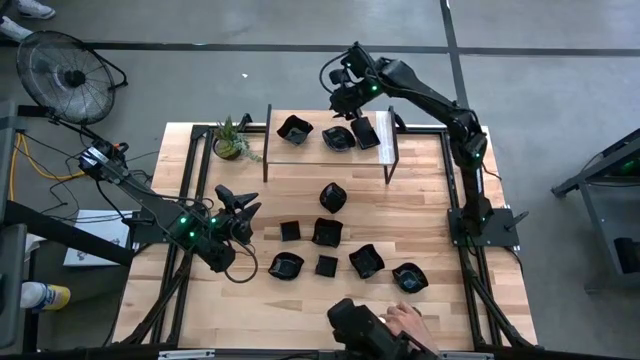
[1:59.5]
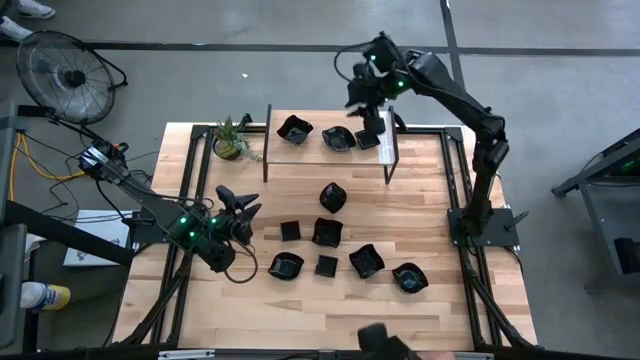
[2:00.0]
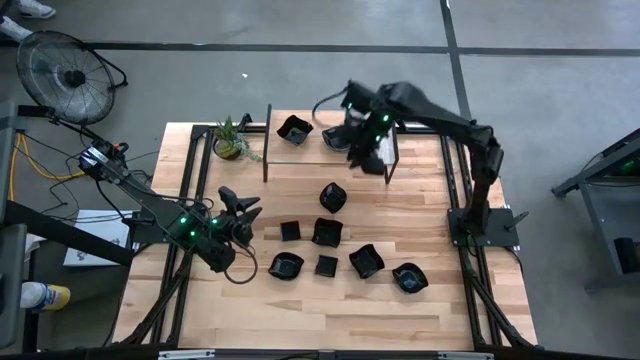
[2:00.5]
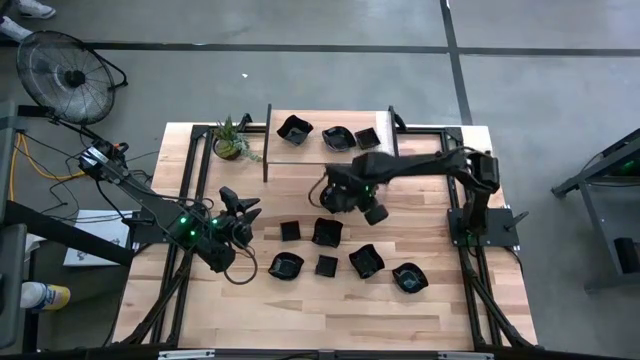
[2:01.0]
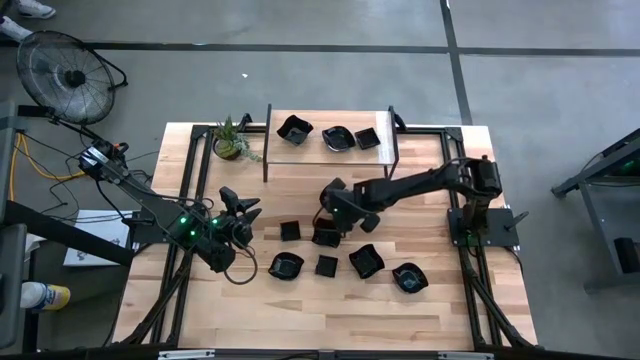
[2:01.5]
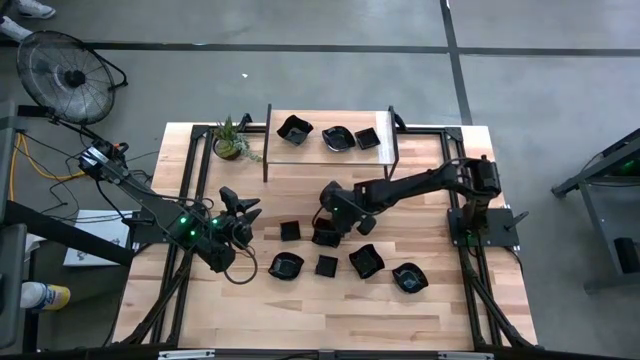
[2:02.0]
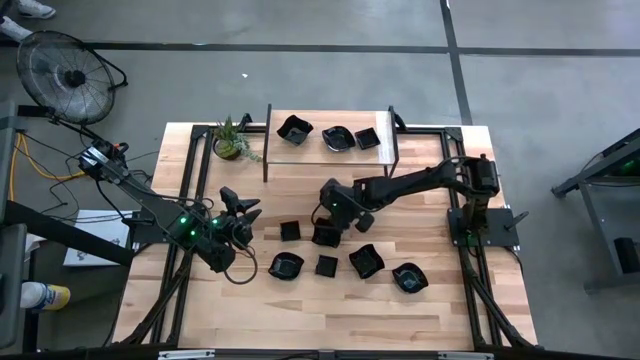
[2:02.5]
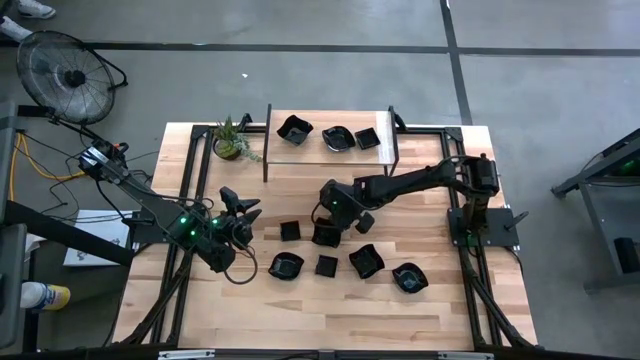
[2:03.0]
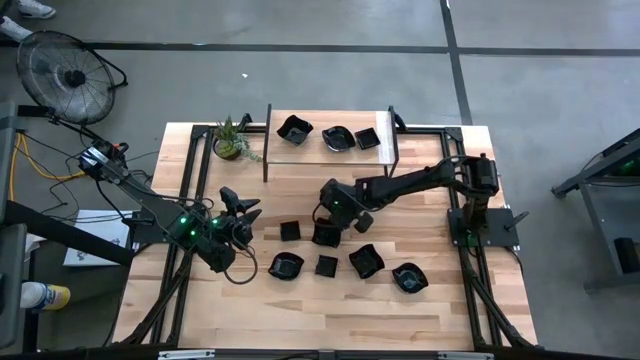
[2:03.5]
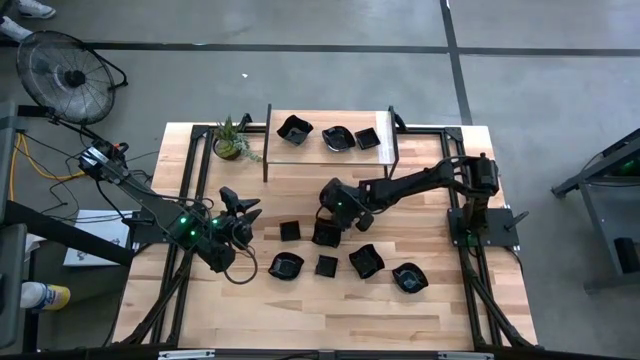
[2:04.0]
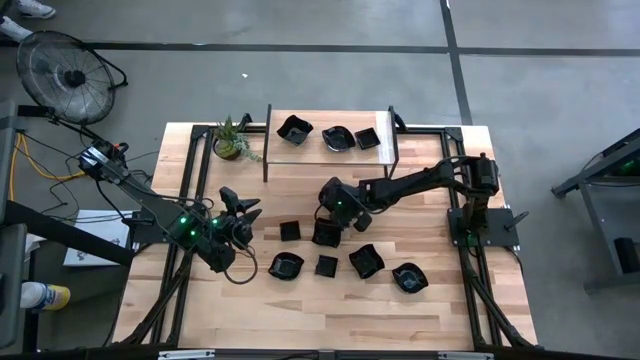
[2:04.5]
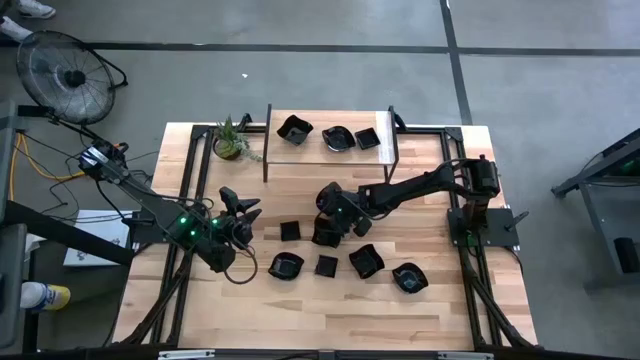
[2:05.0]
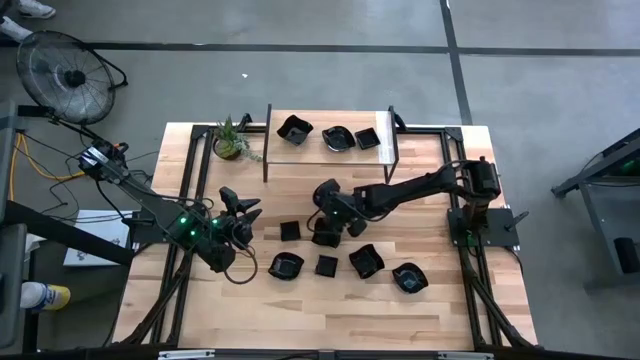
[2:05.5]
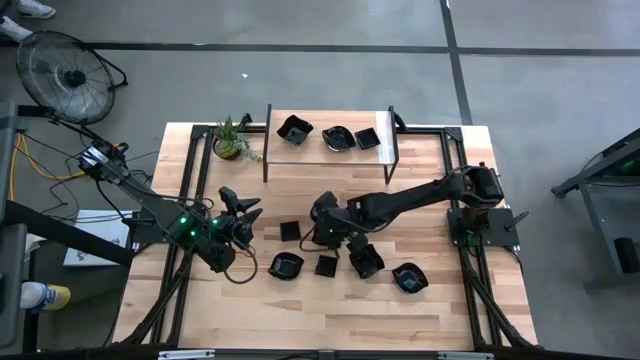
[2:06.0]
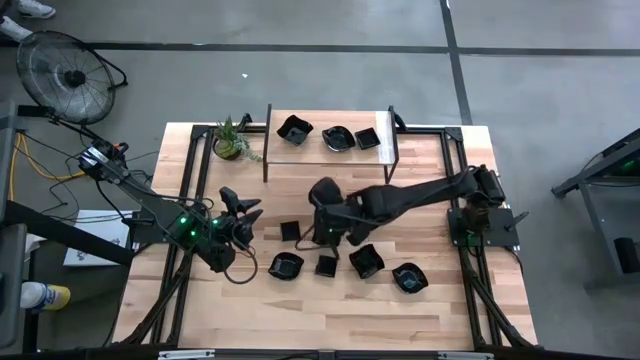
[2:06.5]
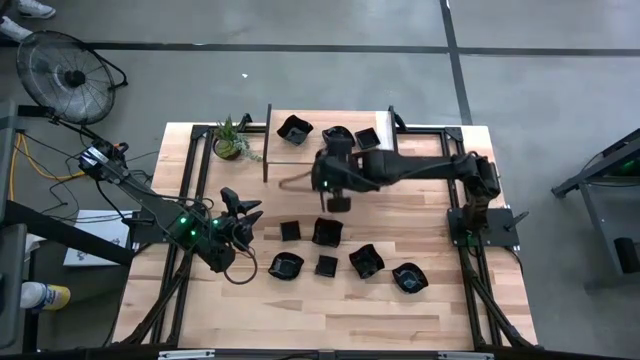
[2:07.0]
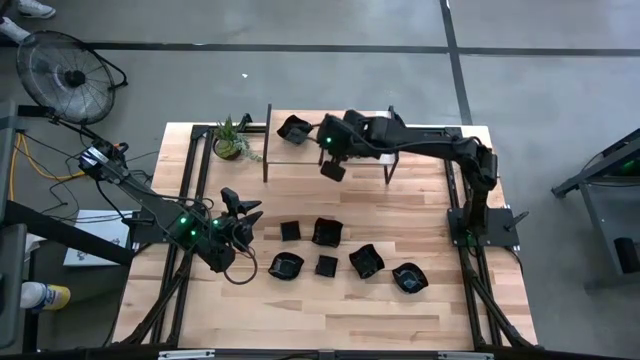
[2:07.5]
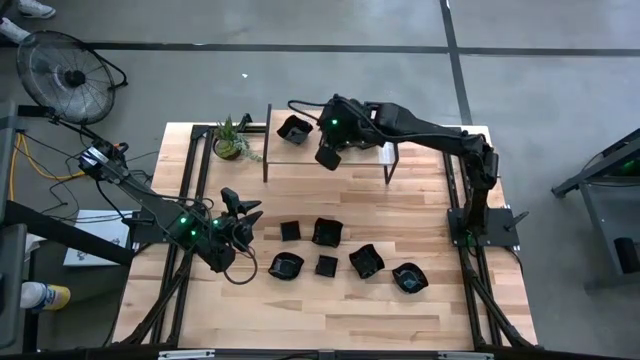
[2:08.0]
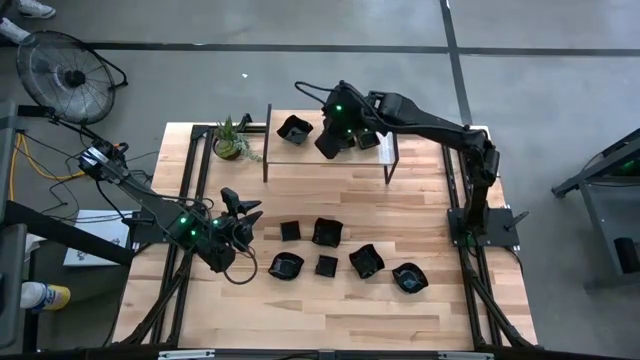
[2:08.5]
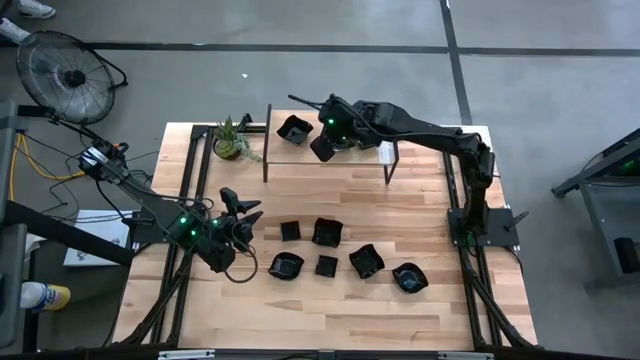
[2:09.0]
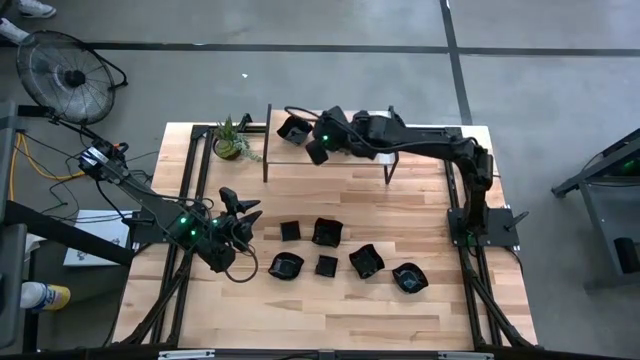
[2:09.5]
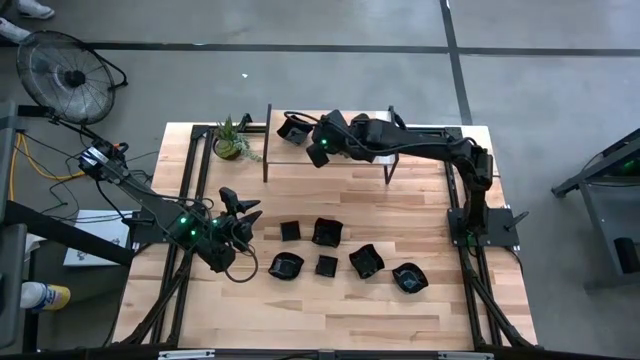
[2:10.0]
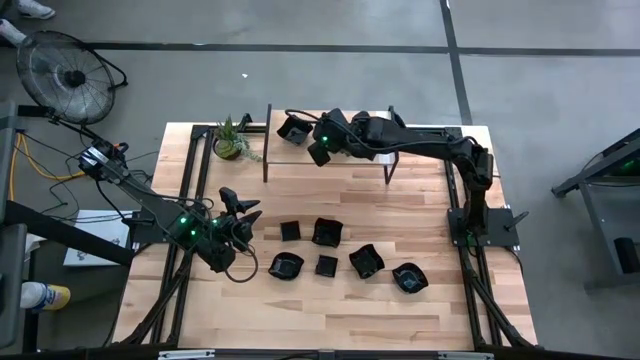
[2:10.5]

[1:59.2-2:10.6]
Task: Pick & Place Mini shaped plates
Stack the black leaf-shaped plate on top of the black leaf-shaped plate on the shelf

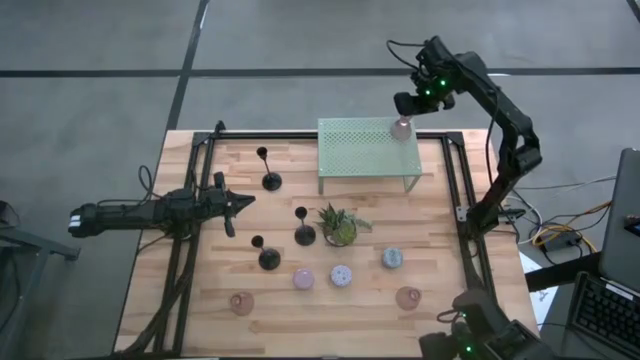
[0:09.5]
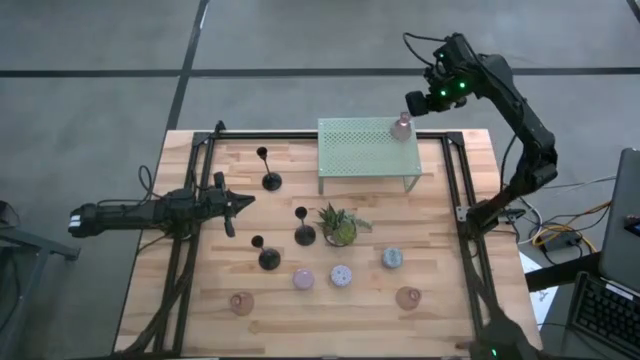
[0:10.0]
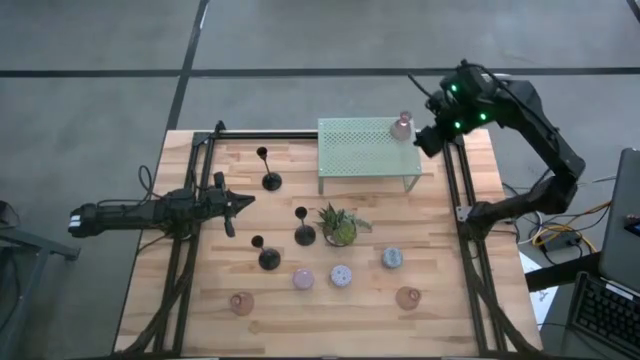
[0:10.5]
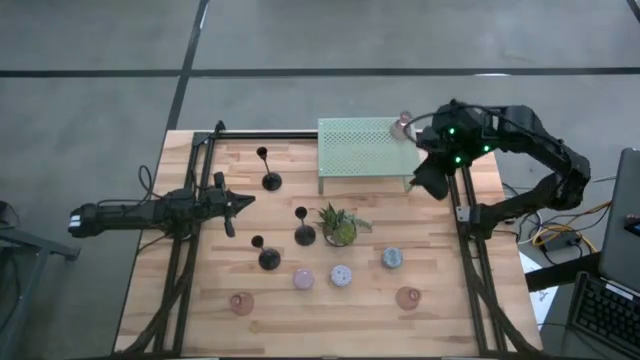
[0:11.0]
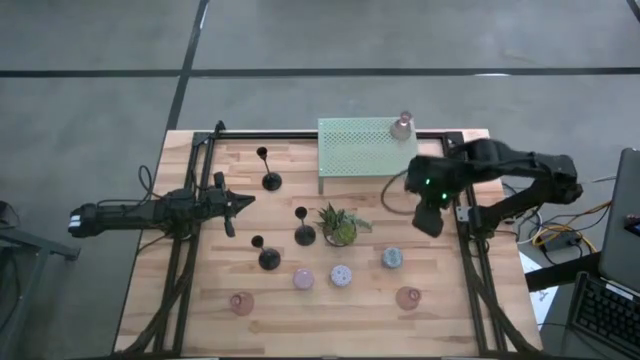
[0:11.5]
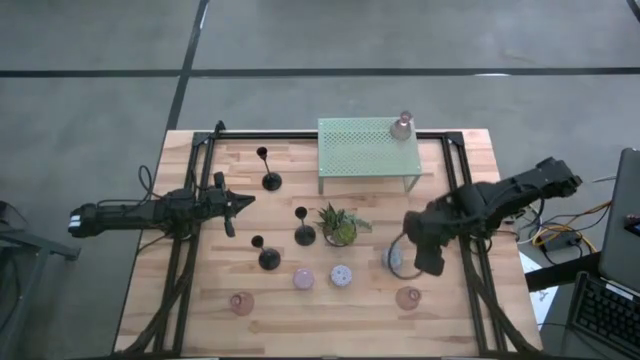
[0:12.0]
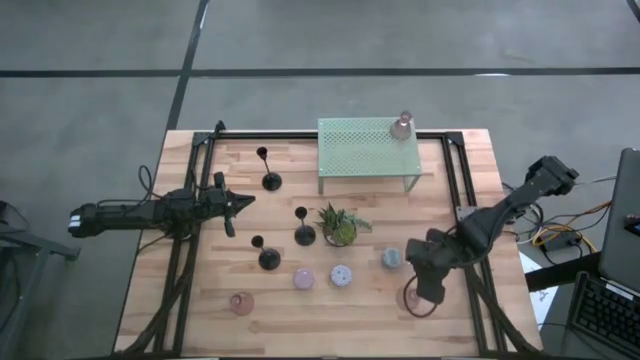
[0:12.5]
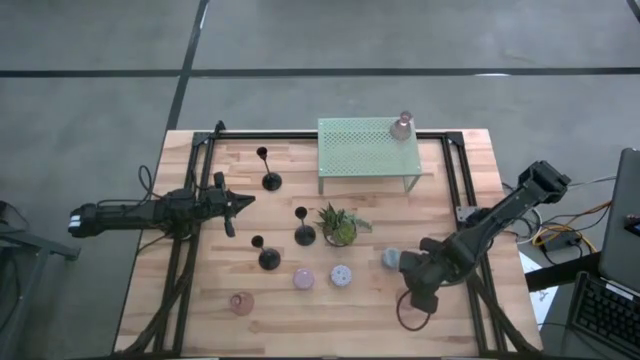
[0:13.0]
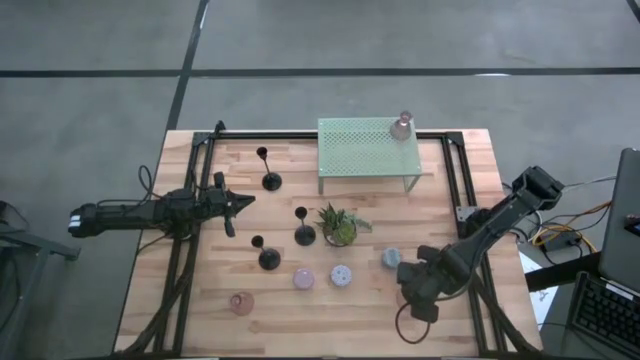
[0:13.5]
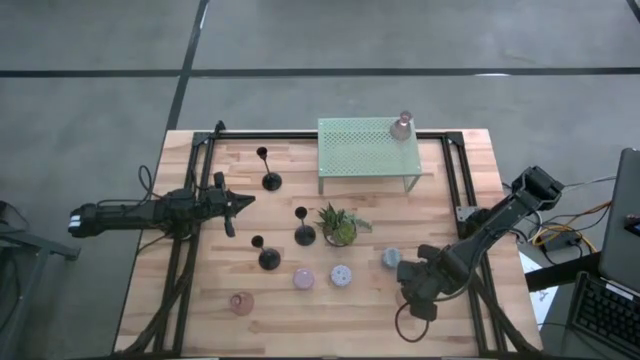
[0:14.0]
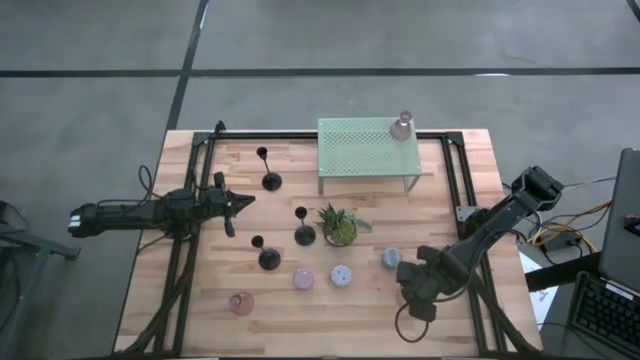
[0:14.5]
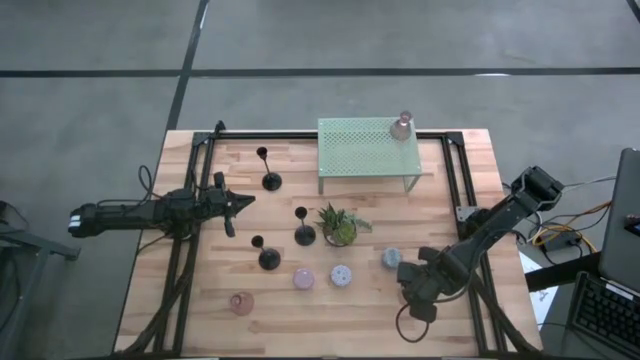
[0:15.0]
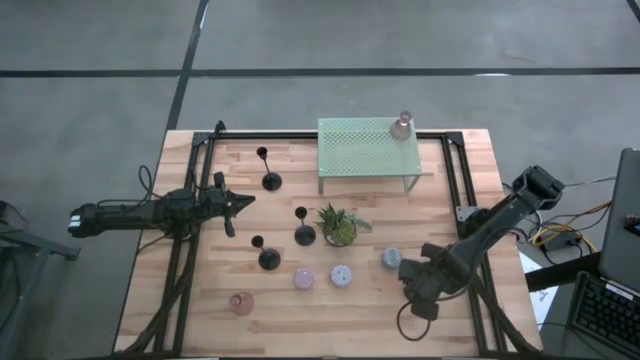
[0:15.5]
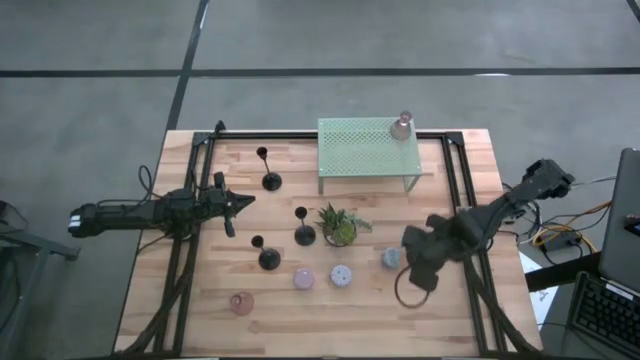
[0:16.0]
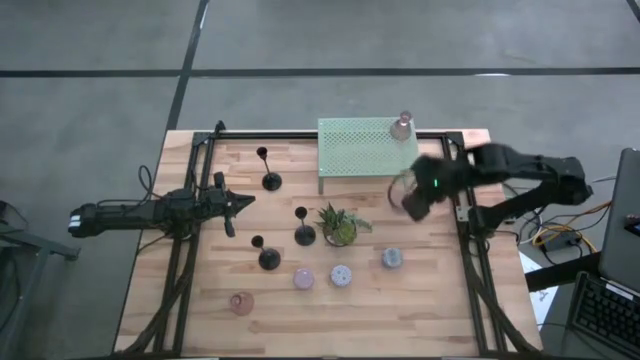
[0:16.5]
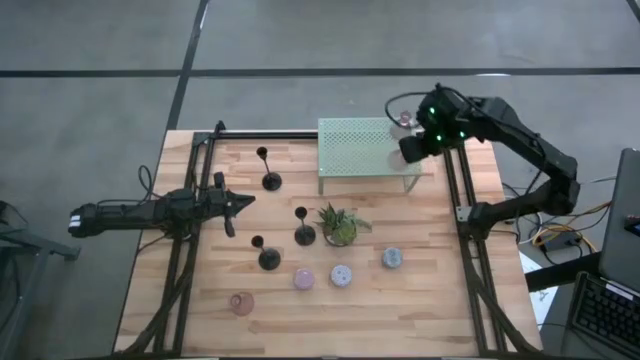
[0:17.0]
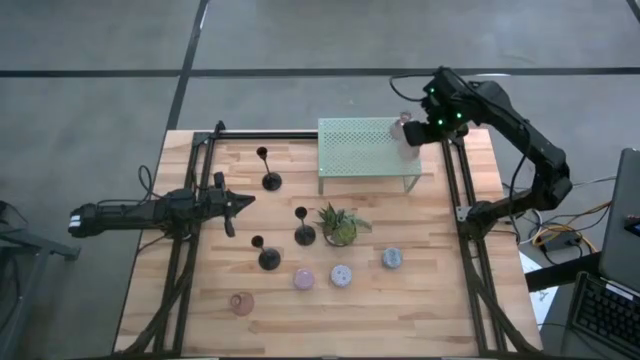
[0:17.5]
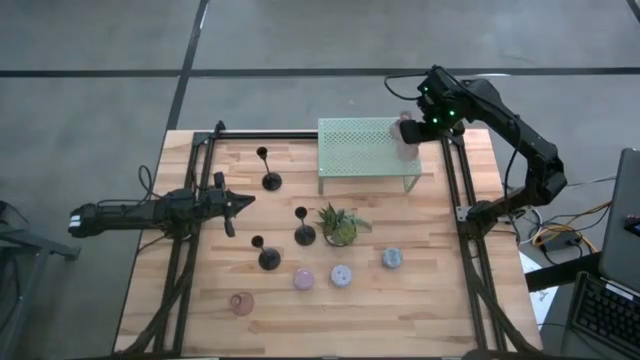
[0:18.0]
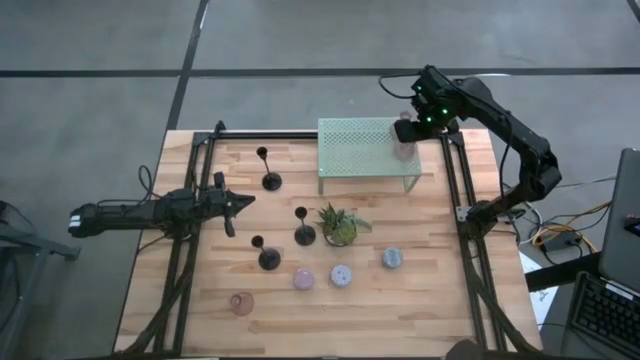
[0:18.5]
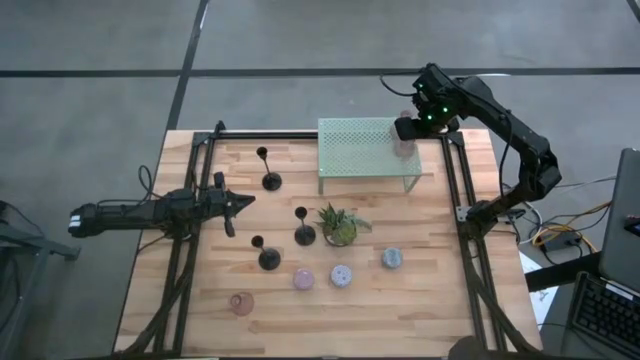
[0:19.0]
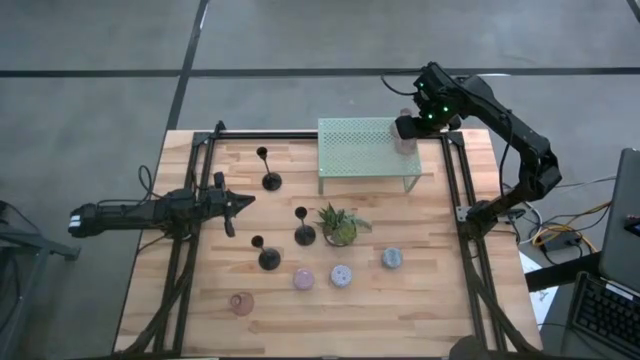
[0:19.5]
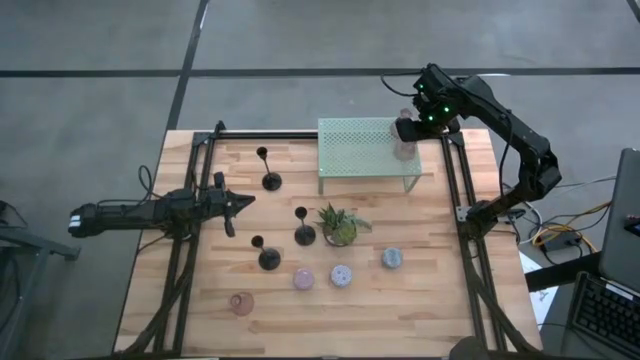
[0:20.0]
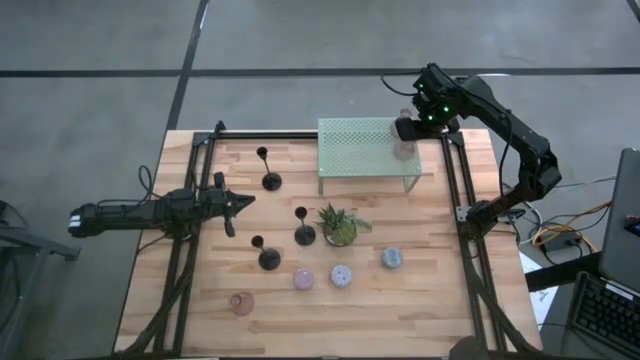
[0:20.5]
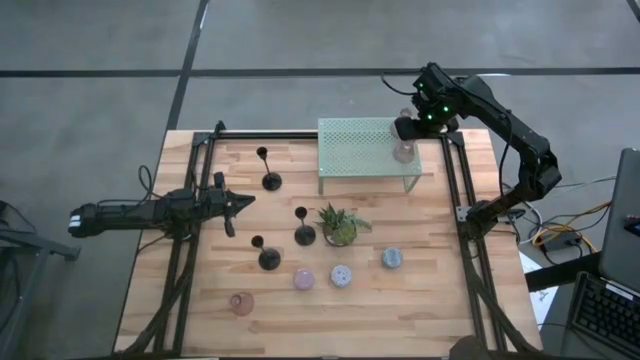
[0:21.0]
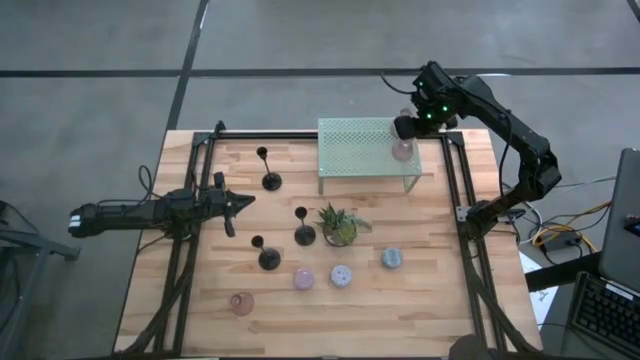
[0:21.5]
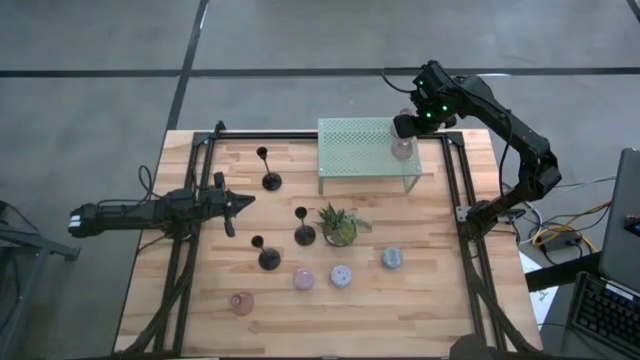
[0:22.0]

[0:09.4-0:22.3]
Task: Pick & Place candle stick holders
Put the right glass candle holder on the shelf
